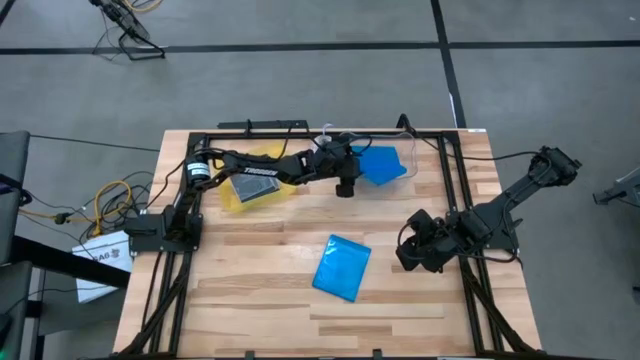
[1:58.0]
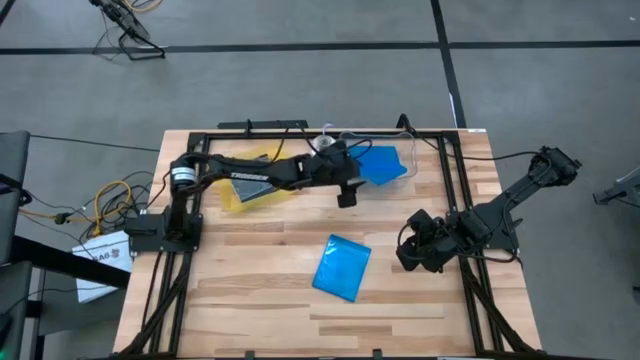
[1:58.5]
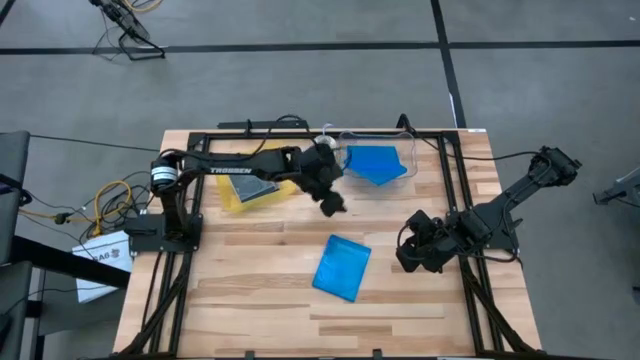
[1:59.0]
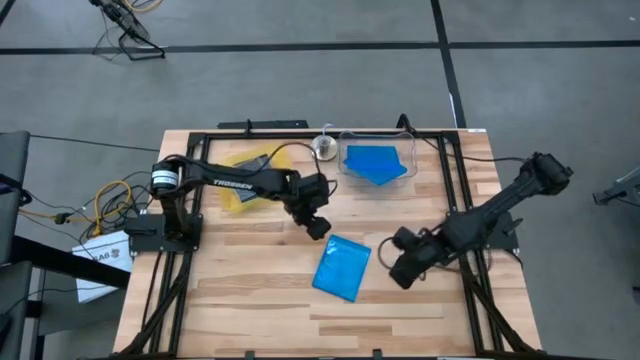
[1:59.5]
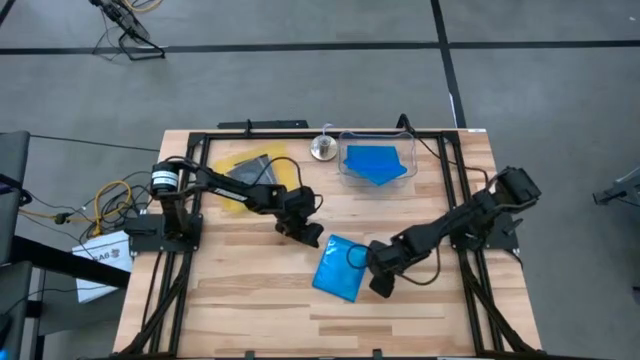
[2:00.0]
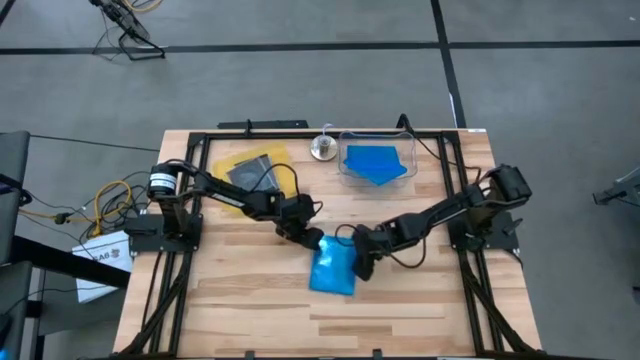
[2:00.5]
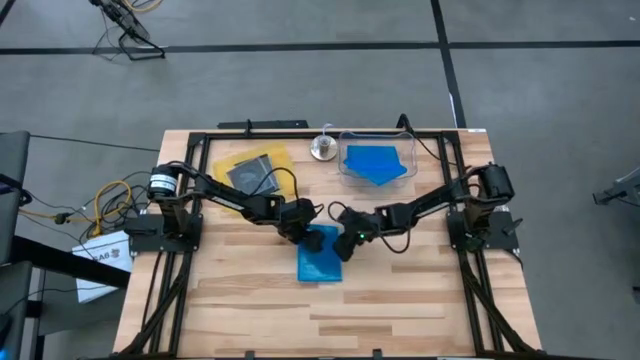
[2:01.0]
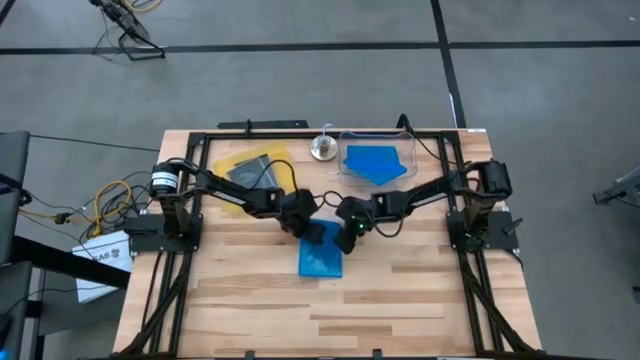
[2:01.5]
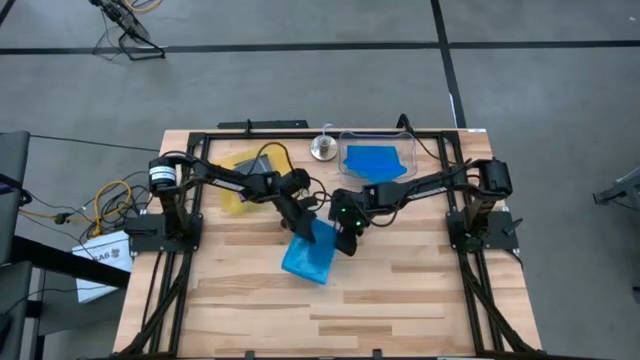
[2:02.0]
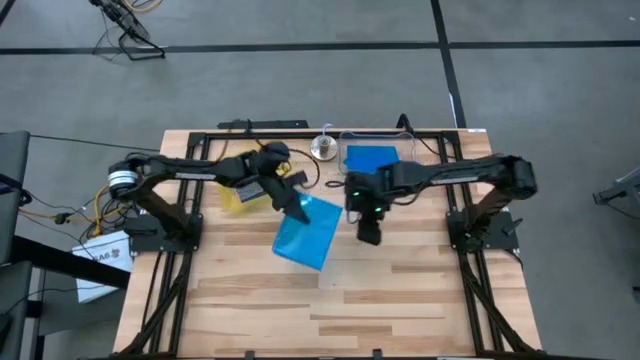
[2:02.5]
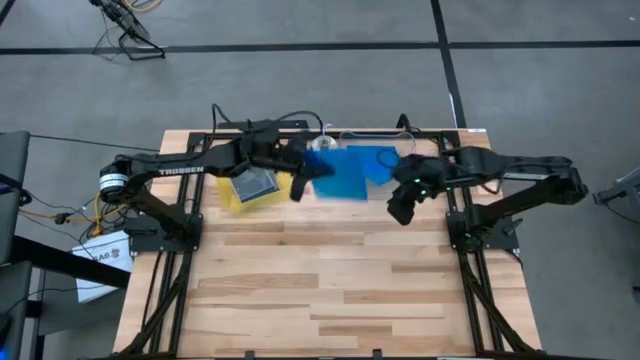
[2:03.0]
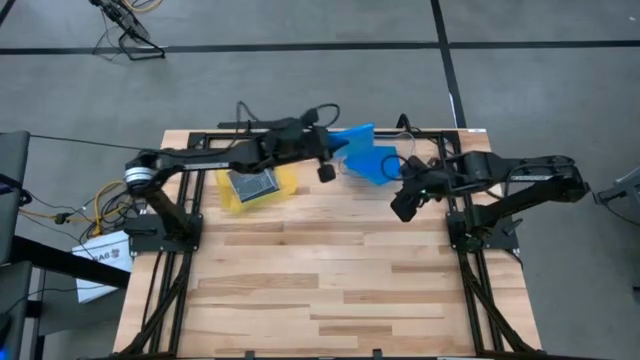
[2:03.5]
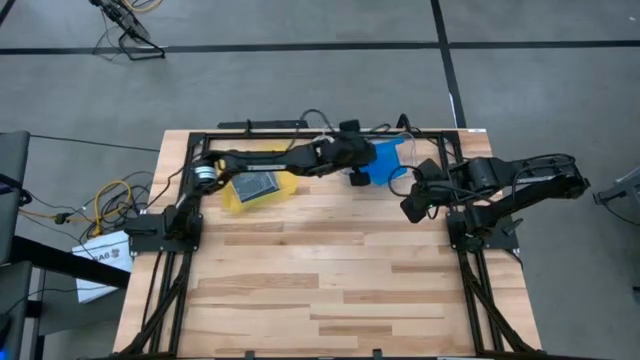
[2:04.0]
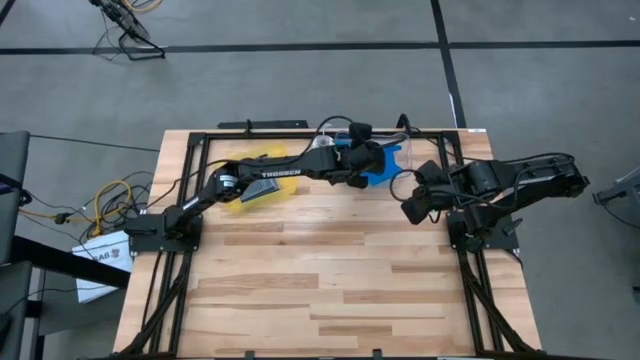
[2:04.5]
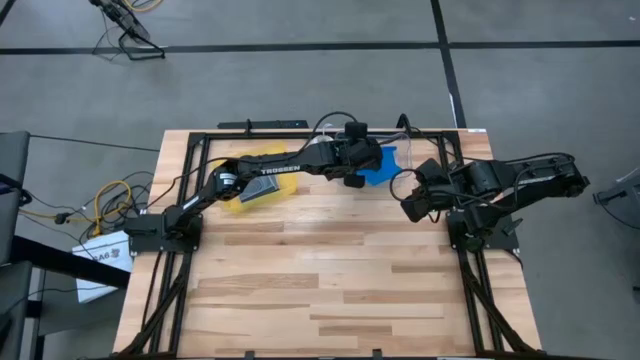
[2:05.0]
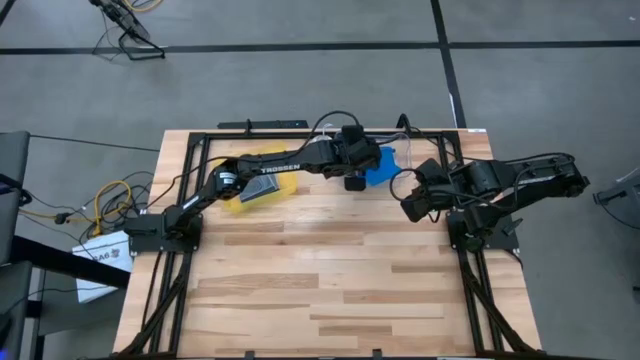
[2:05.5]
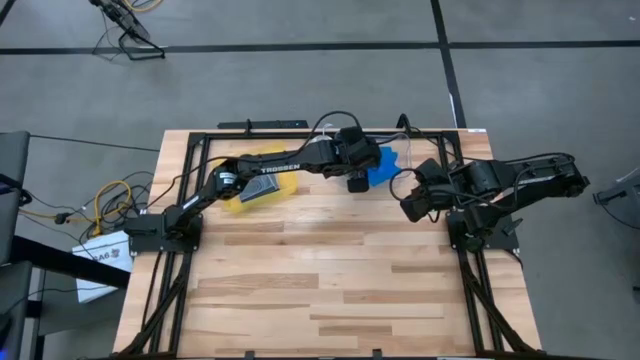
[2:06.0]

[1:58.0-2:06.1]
Task: Pick & place jewel cases by type
Put the blue CD case into the transparent bin

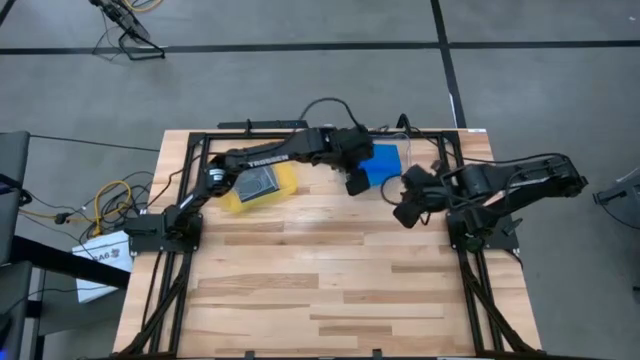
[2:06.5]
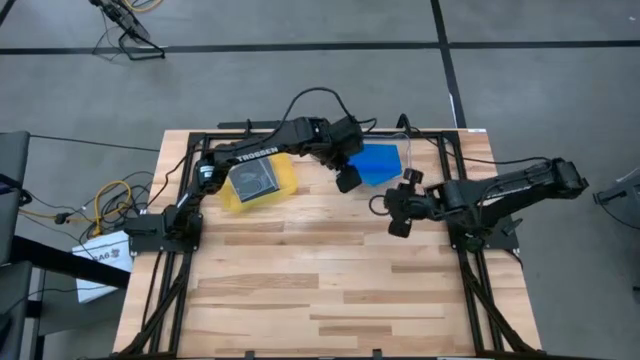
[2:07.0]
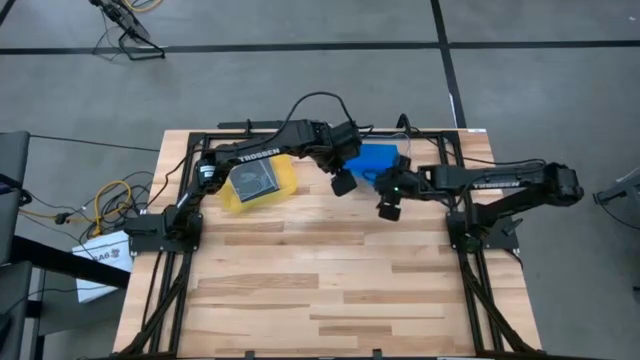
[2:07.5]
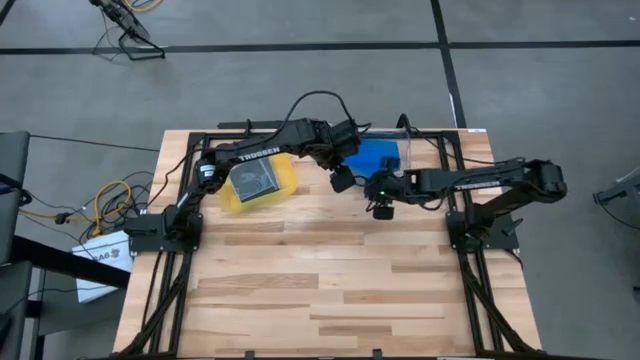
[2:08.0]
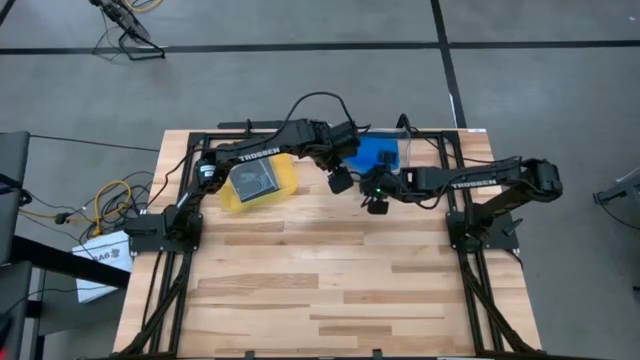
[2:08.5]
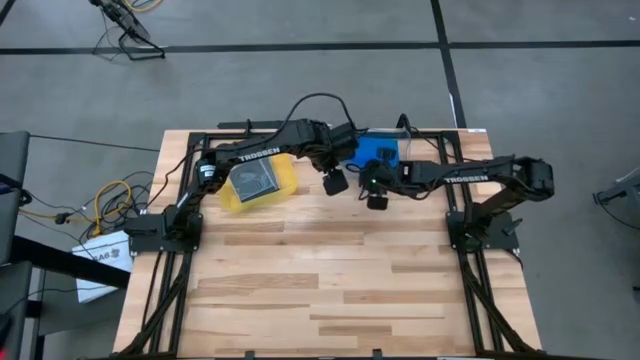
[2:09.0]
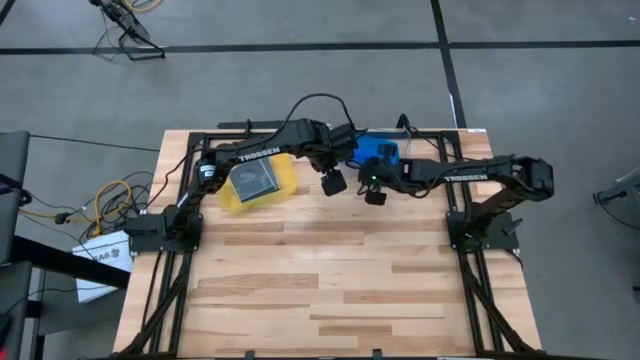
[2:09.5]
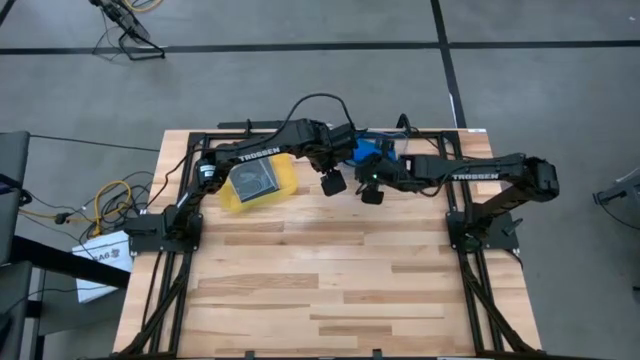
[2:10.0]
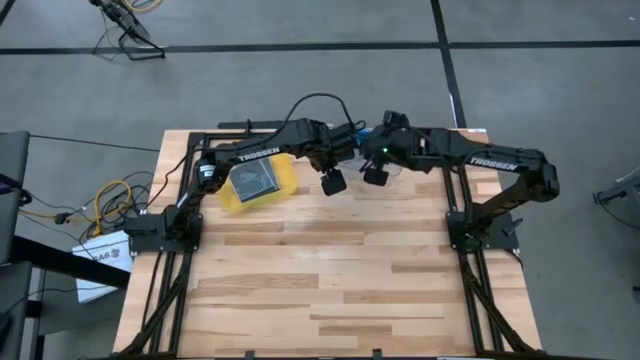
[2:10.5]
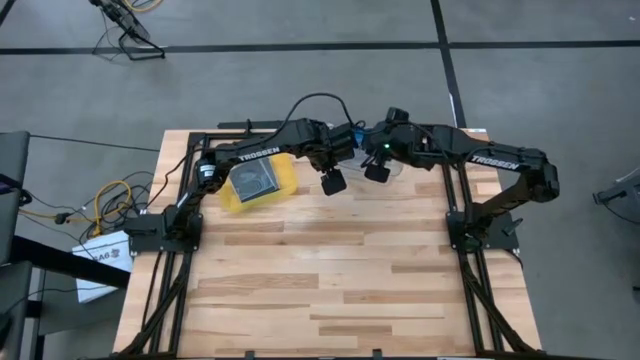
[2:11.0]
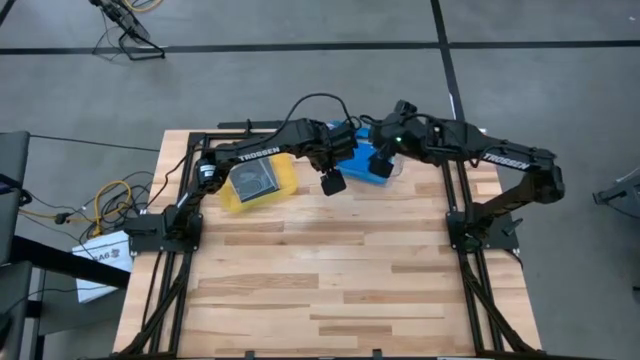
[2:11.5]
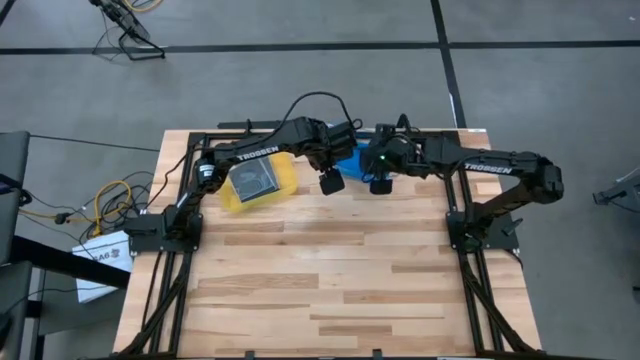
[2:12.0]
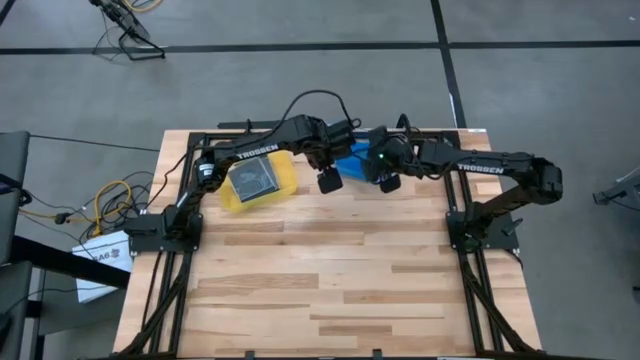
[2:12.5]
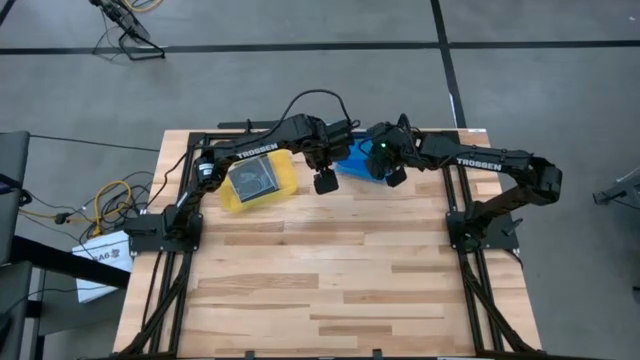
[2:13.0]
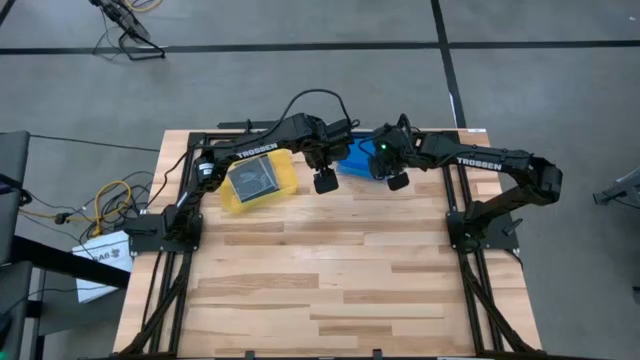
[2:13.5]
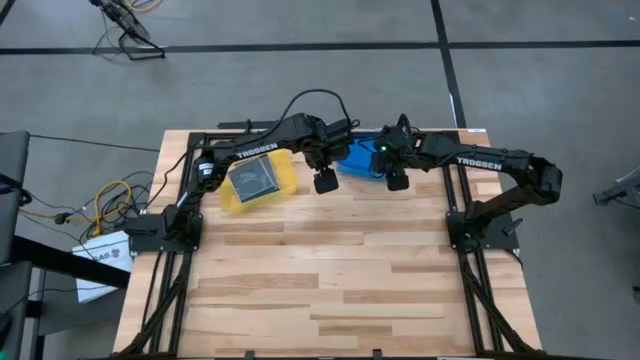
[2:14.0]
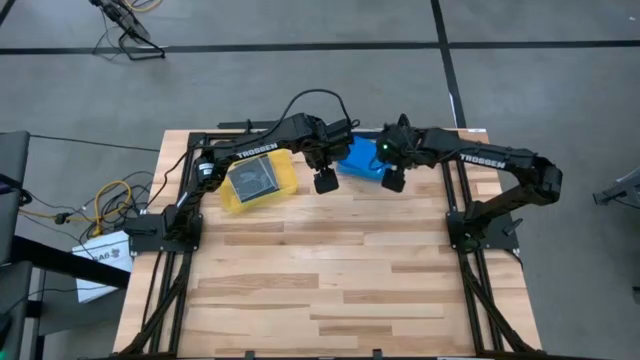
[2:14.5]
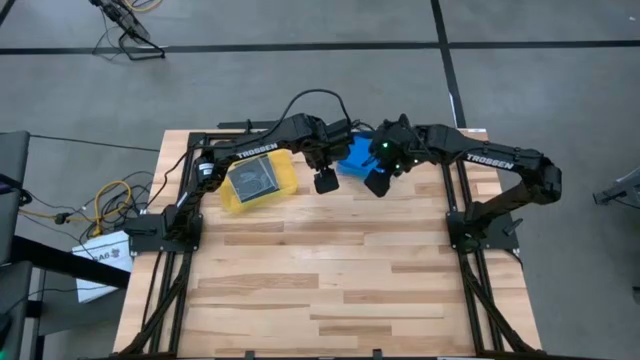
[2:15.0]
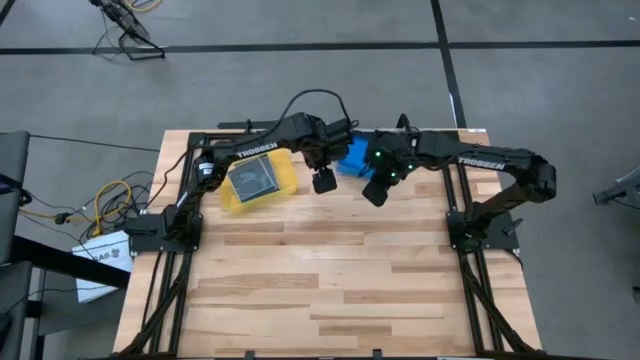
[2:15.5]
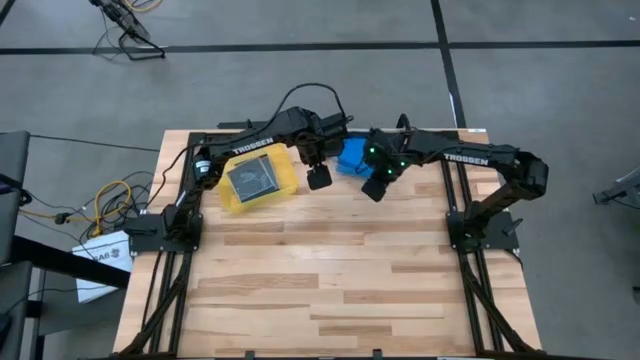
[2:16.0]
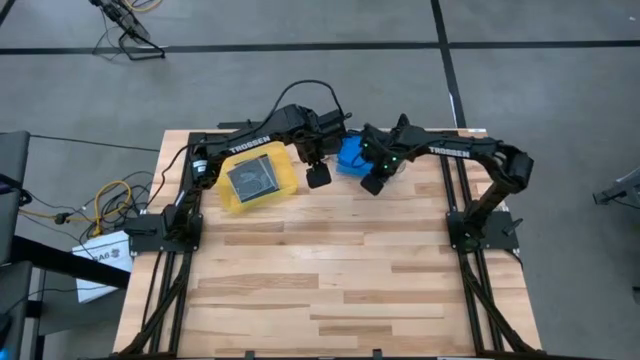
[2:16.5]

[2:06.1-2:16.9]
Adjust the blue CD case in the transparent bin

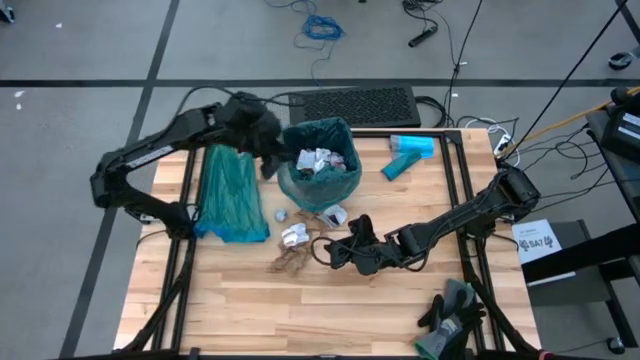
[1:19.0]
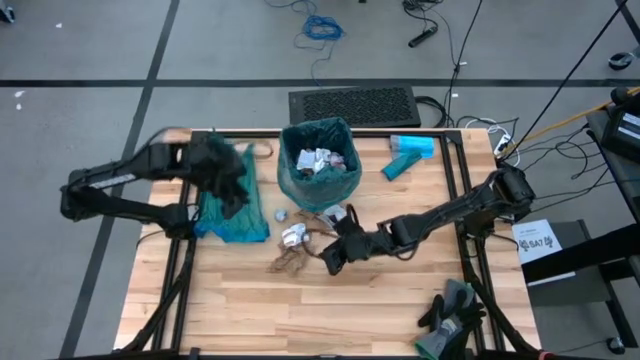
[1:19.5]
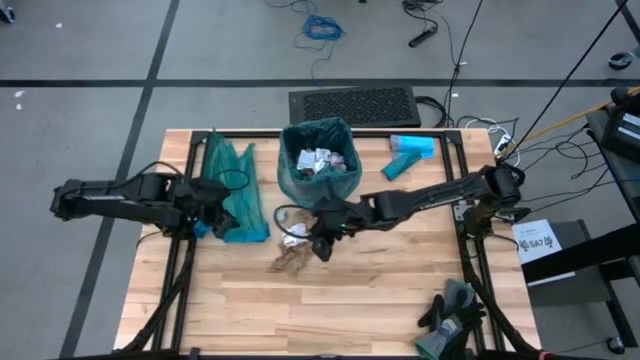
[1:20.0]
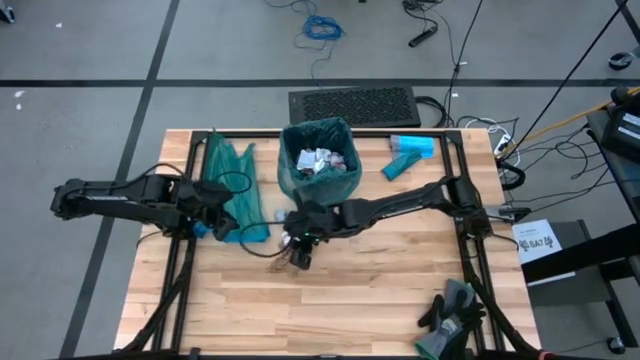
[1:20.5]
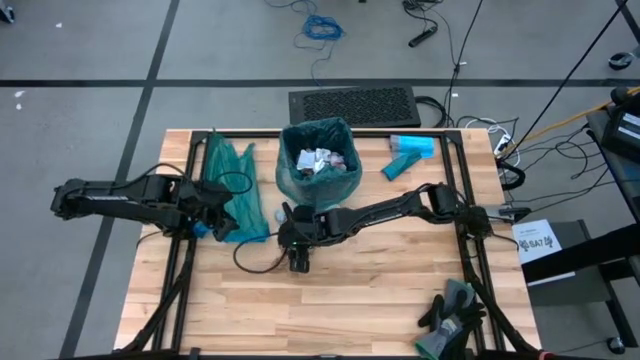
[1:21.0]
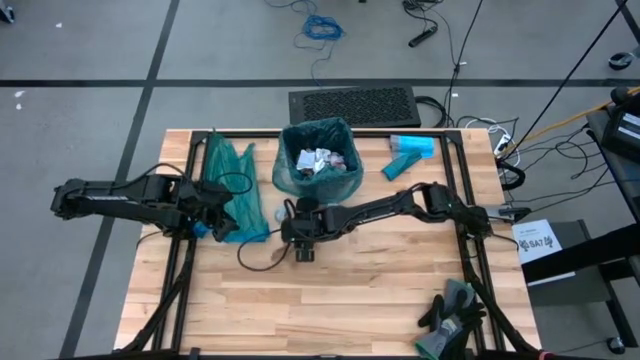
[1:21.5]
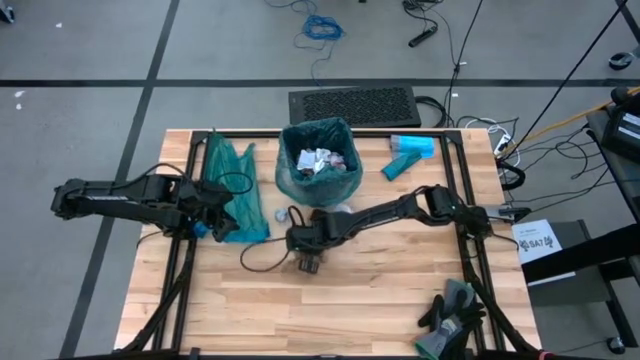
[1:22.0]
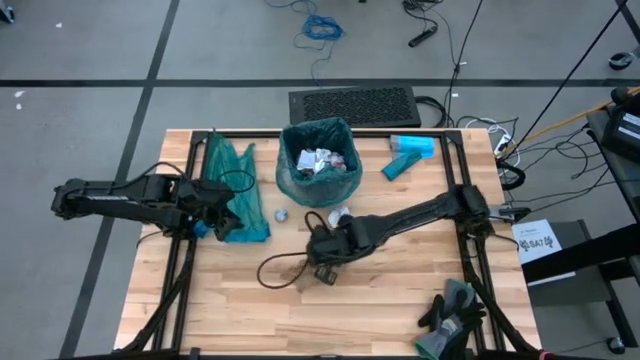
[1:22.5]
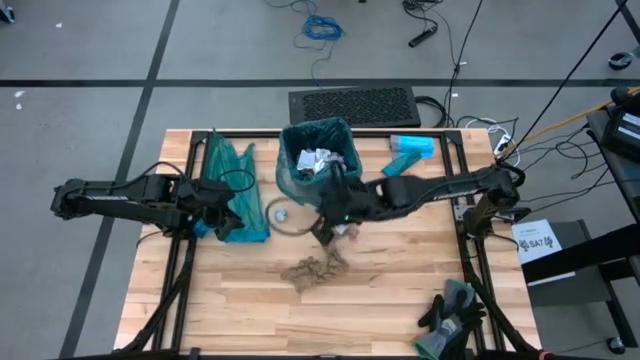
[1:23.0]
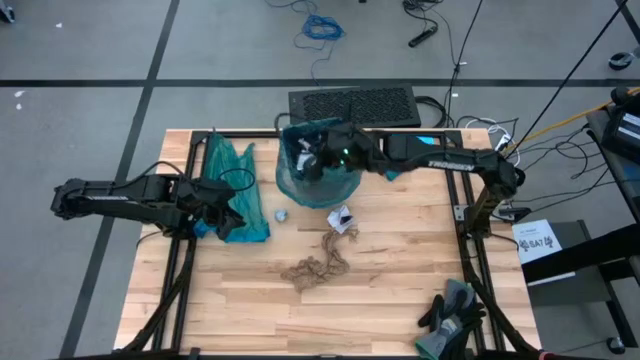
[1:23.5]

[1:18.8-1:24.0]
Task: place trash/remove bag and relplace
Put the white paper into the blue trash bag inside the black trash bin
